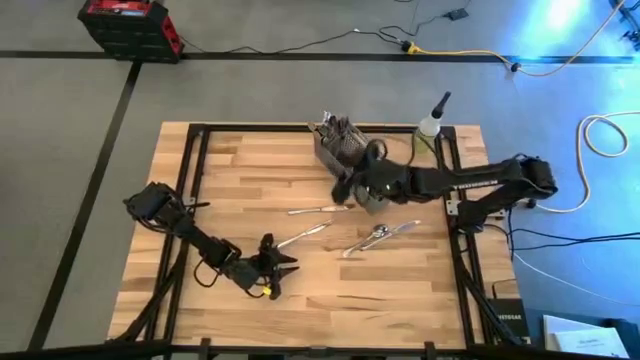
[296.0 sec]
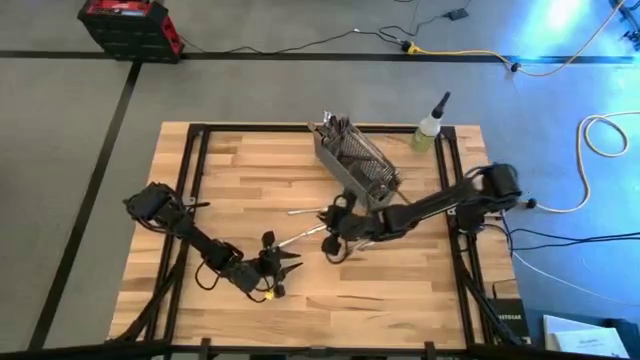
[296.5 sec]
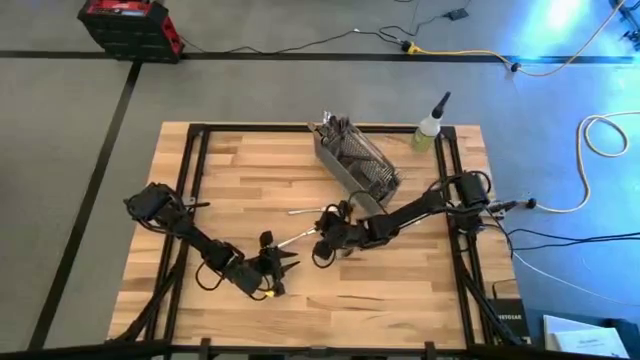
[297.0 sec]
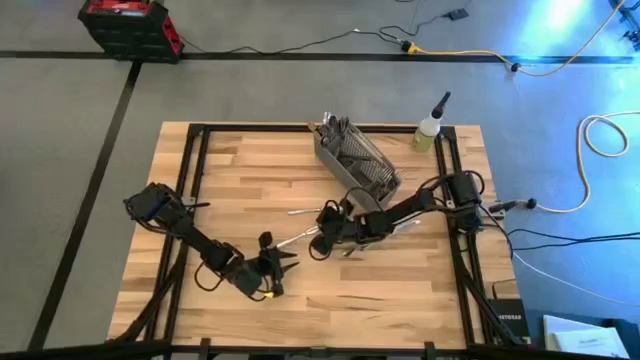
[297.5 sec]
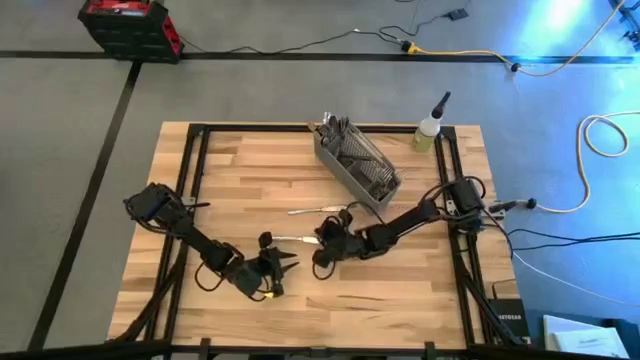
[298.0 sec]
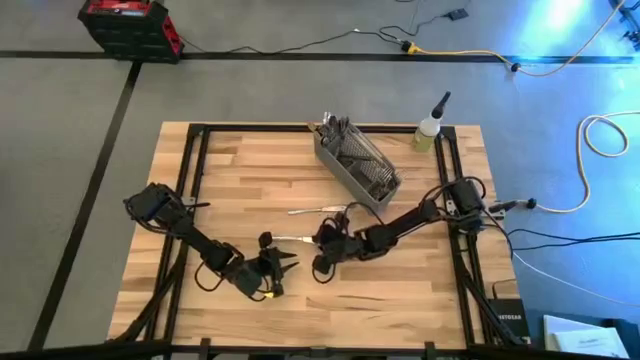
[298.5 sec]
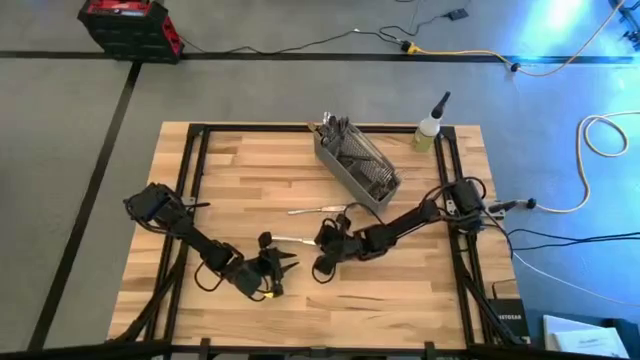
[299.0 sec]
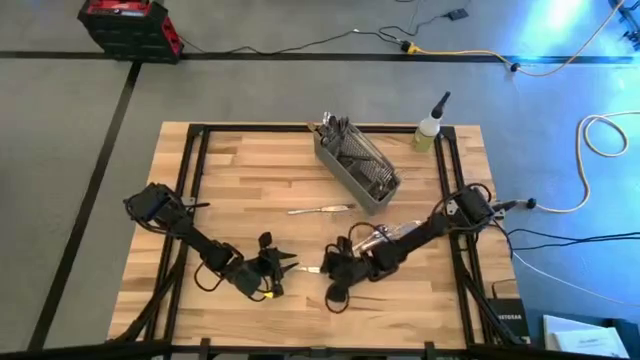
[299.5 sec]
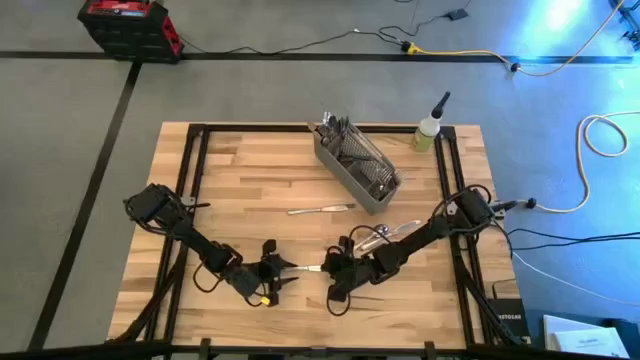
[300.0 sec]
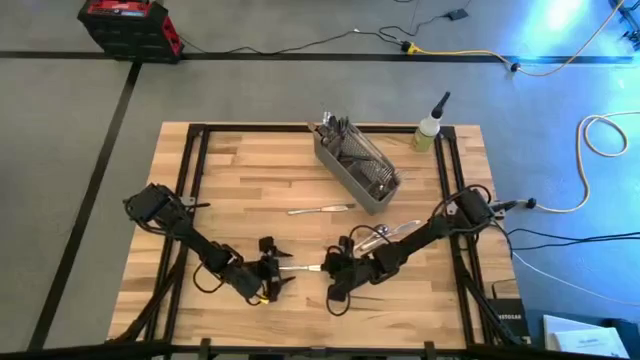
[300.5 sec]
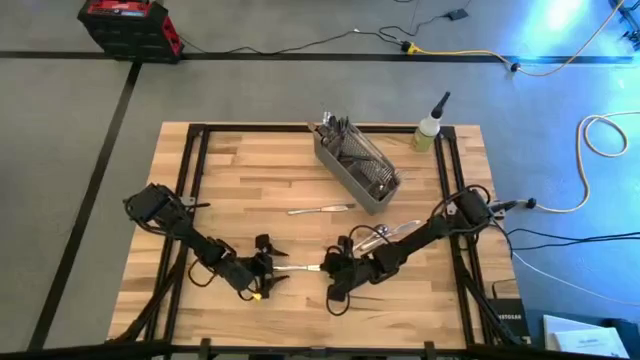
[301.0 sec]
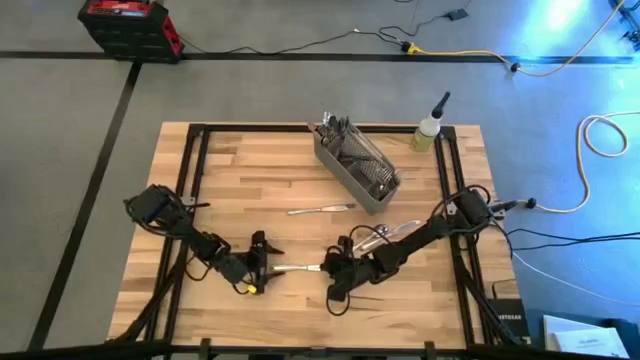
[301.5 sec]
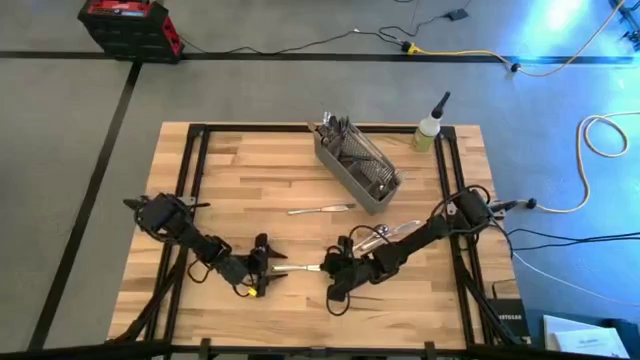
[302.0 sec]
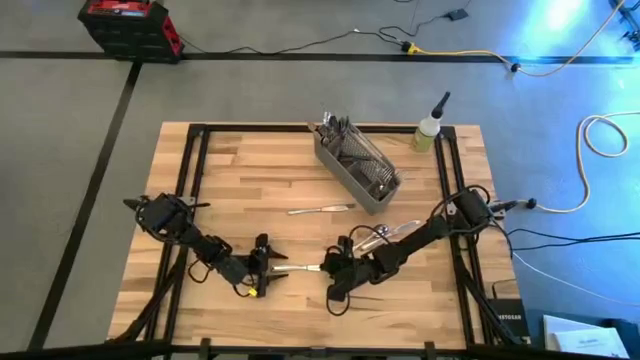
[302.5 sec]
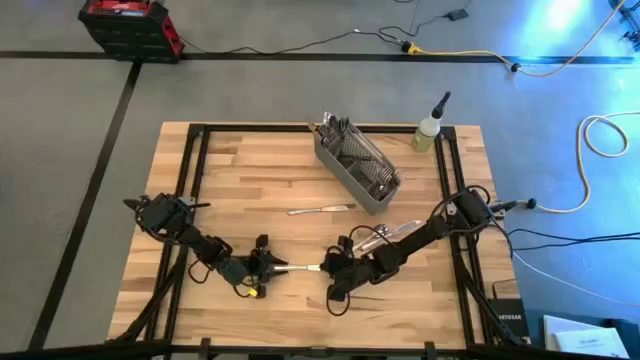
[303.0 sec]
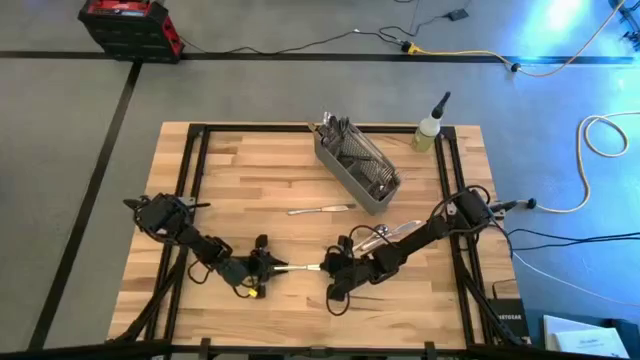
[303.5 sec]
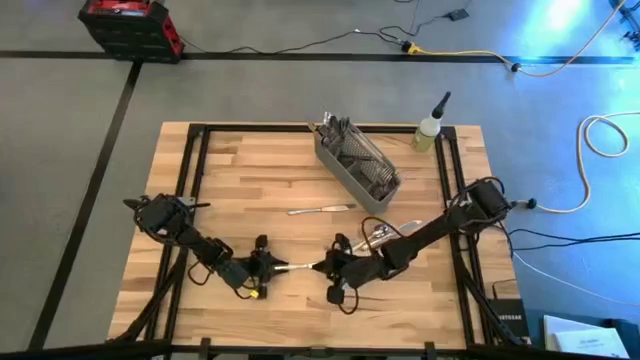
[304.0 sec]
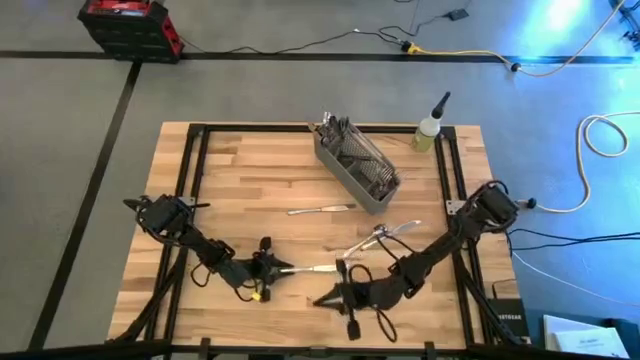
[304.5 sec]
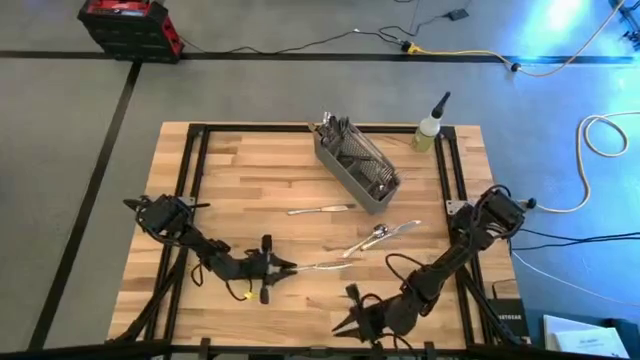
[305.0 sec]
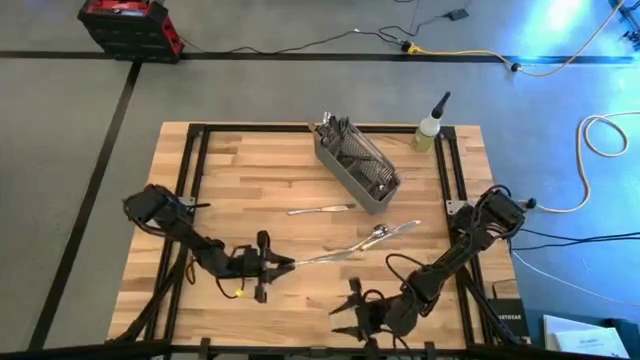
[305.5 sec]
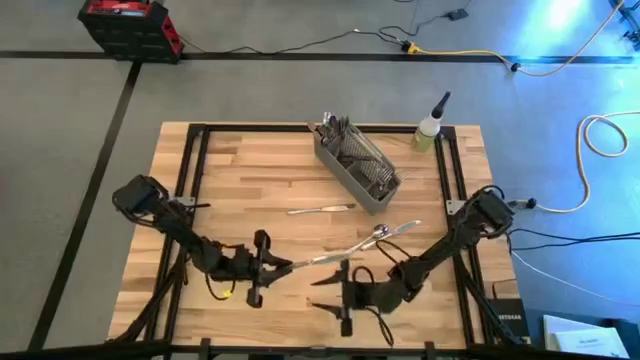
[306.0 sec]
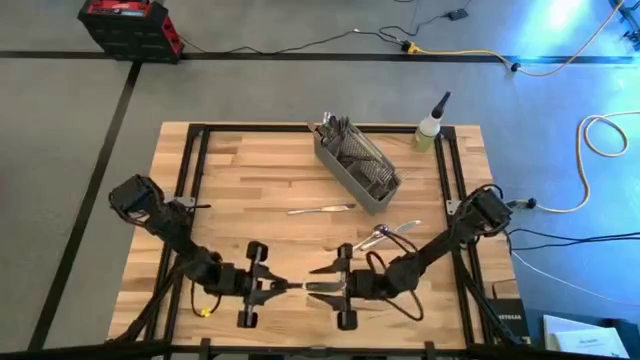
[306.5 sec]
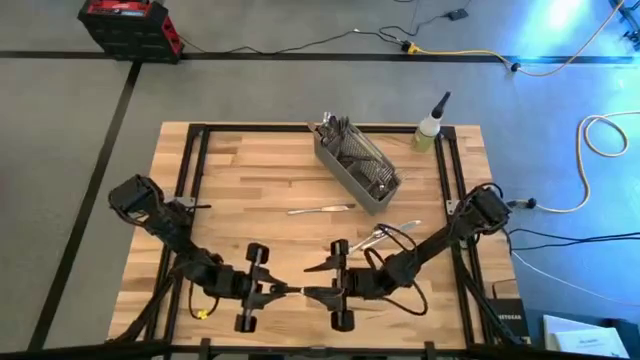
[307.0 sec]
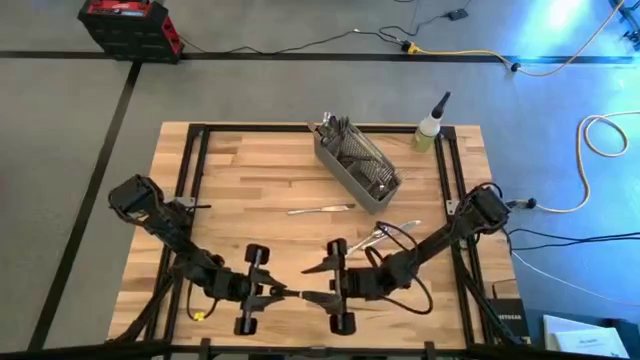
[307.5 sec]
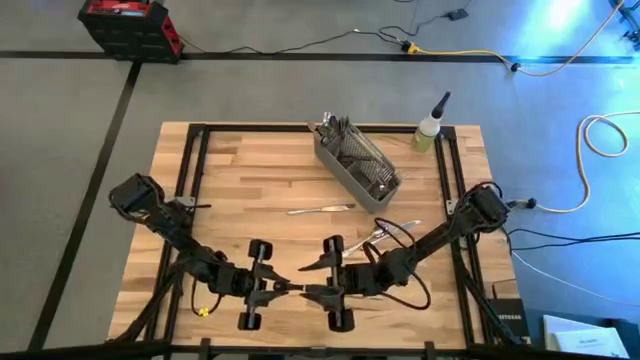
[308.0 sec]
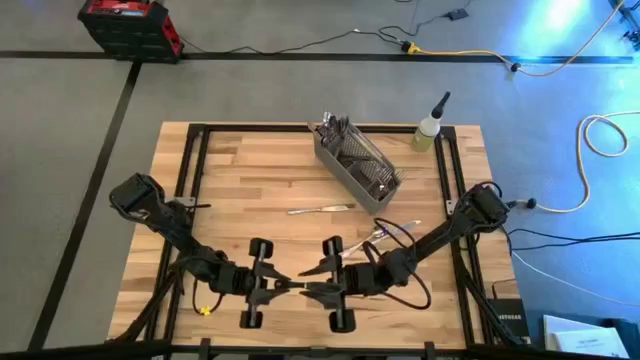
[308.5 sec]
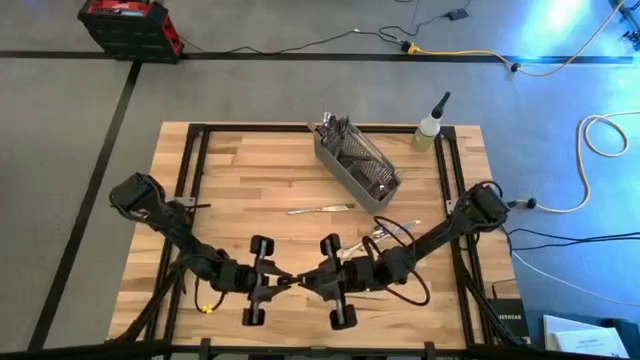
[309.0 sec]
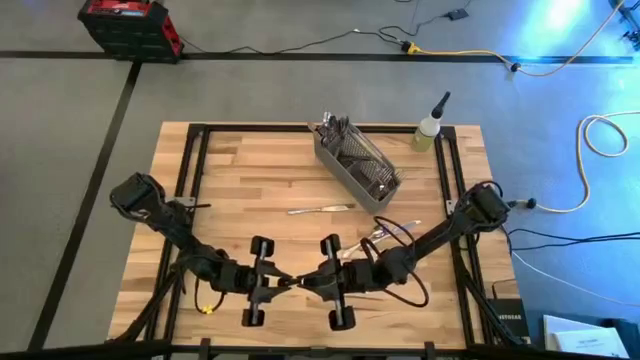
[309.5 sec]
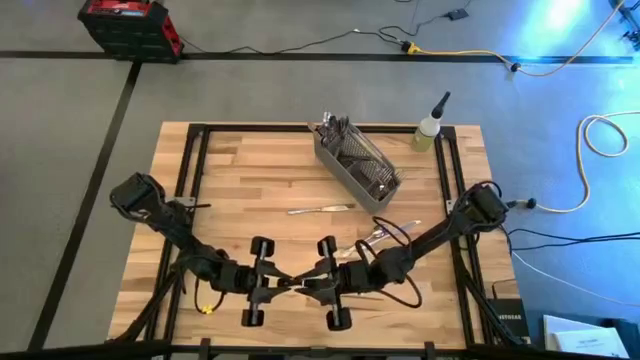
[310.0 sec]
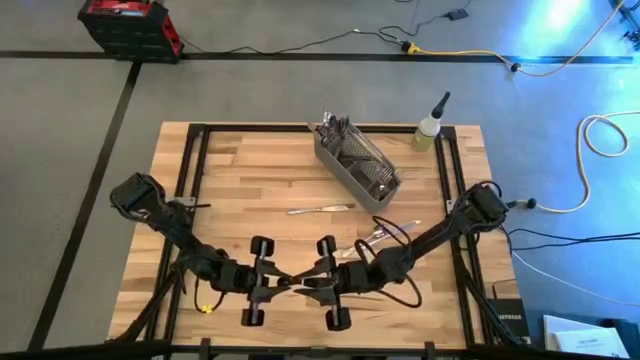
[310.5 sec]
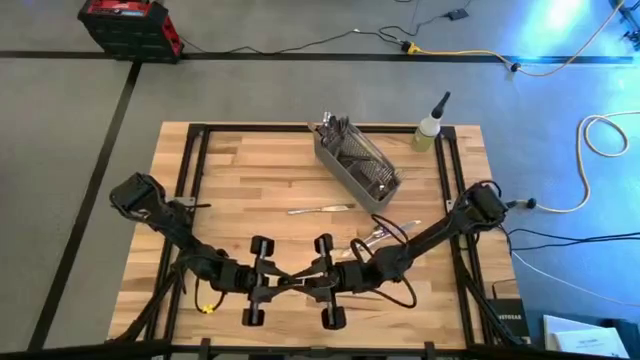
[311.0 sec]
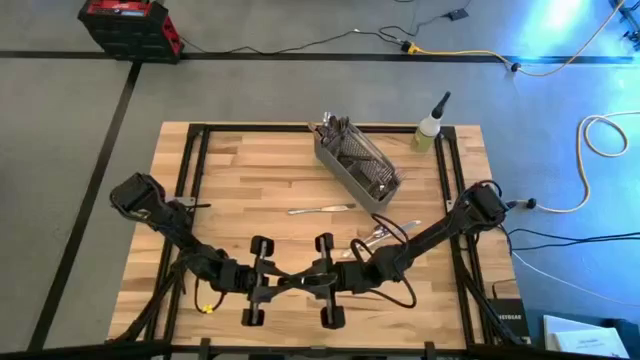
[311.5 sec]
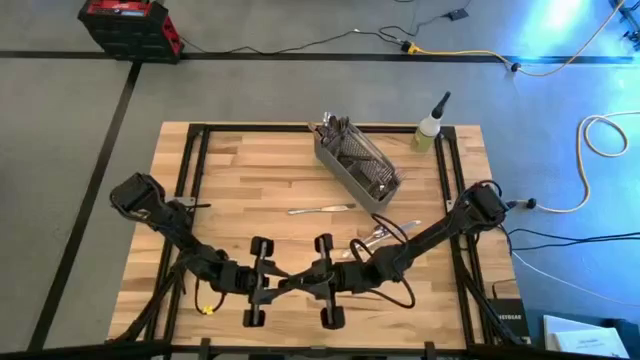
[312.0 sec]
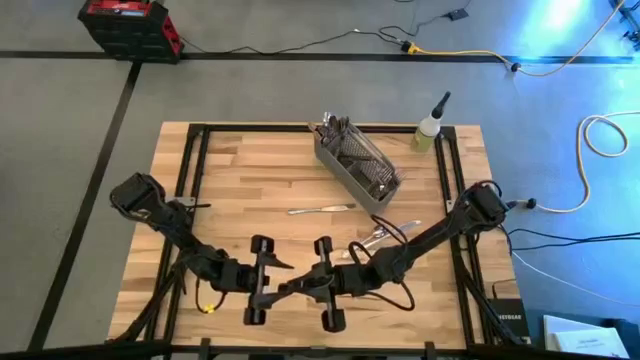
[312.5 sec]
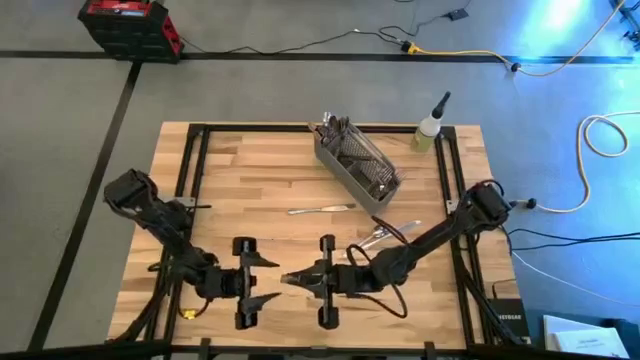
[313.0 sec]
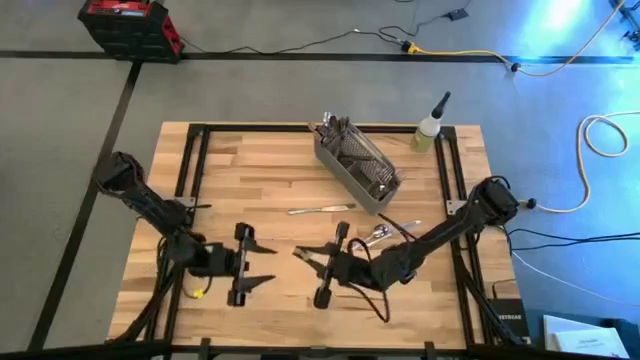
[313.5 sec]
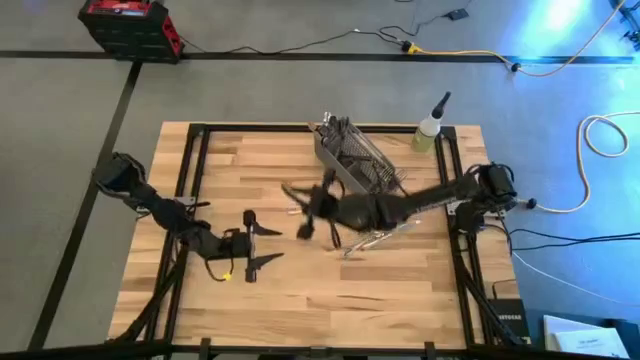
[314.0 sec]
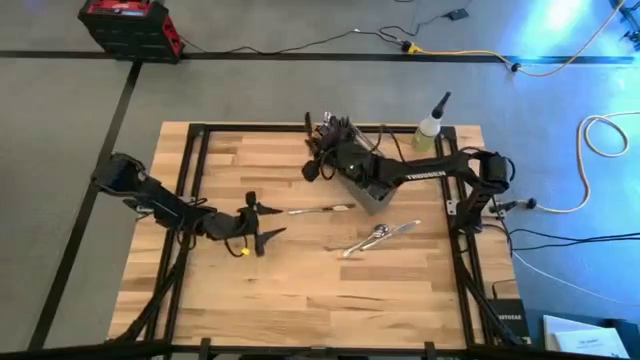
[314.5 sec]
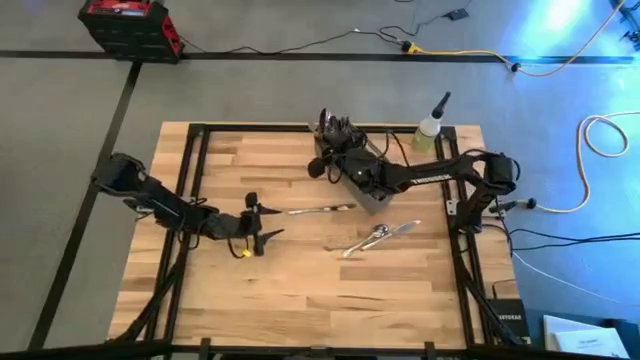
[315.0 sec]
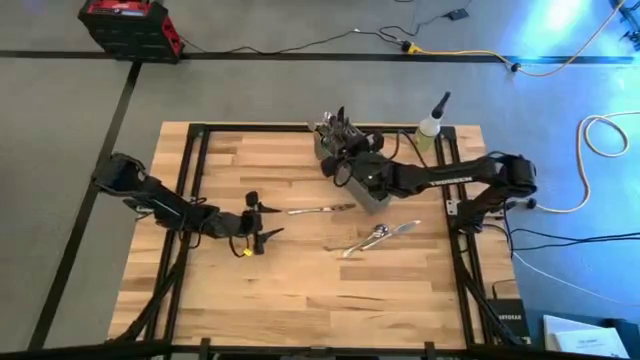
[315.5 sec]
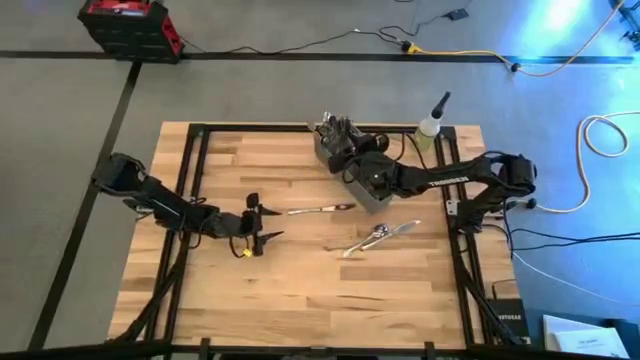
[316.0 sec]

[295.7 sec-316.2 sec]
Task: Sort silverware
Put the silver knife into the gray silverware organizer

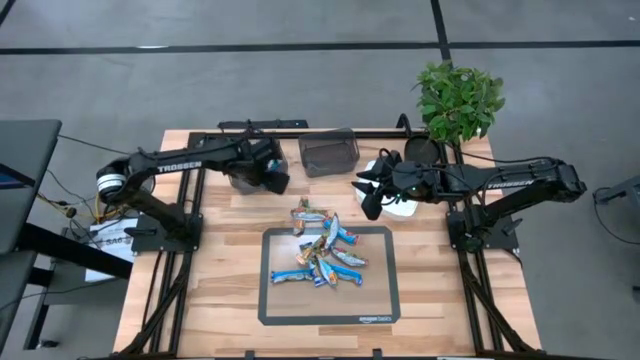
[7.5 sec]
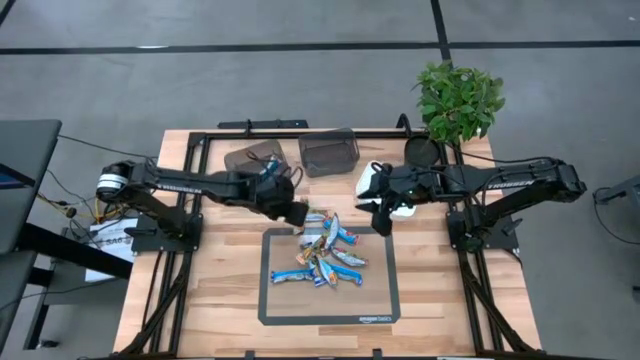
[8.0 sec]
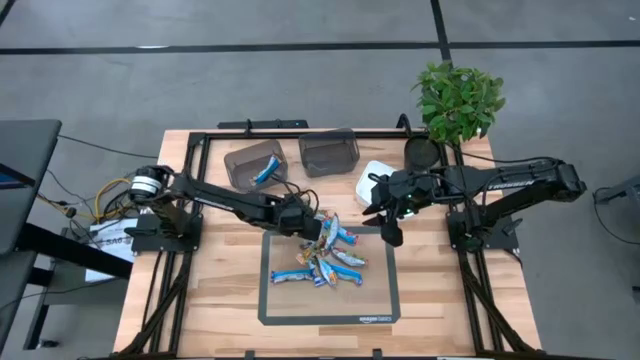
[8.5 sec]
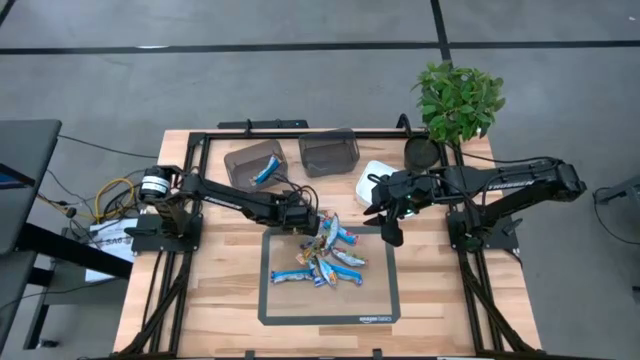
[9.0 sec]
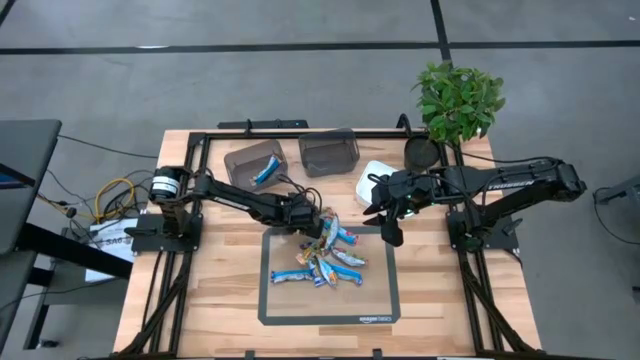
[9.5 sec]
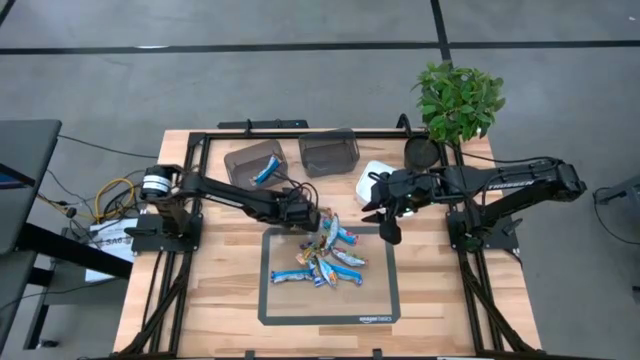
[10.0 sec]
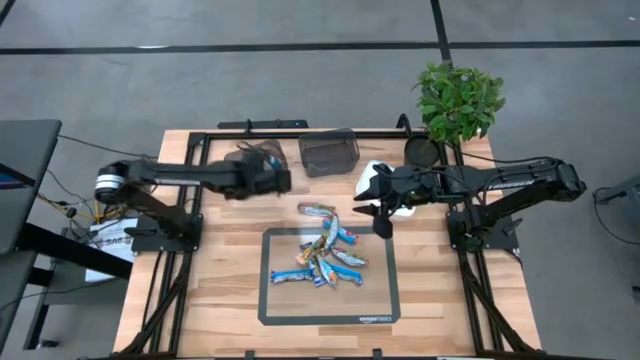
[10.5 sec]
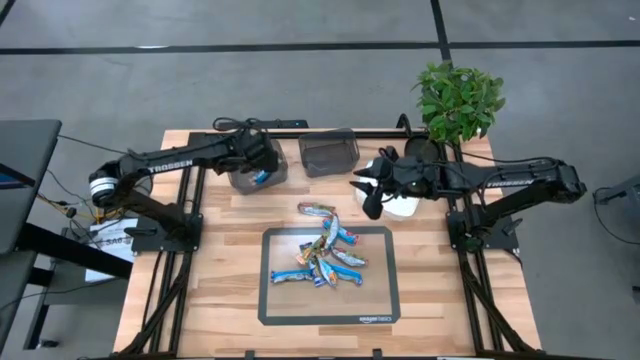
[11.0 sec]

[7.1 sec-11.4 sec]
Task: Pick and place Granola Bars by type
Put the yellow granola bar into the left black bin
